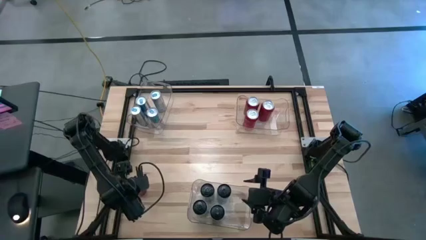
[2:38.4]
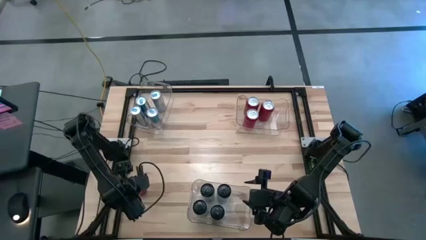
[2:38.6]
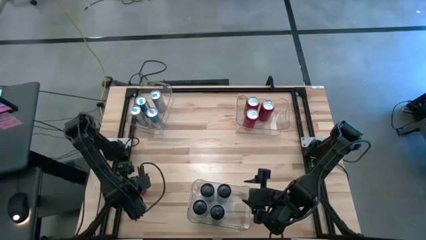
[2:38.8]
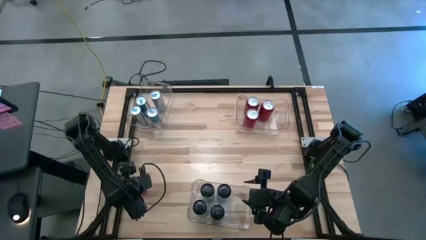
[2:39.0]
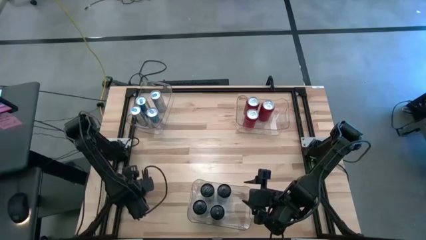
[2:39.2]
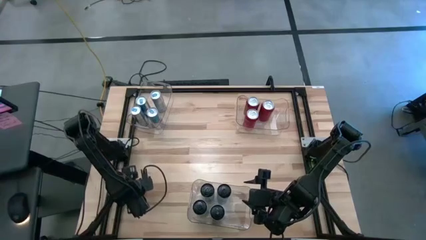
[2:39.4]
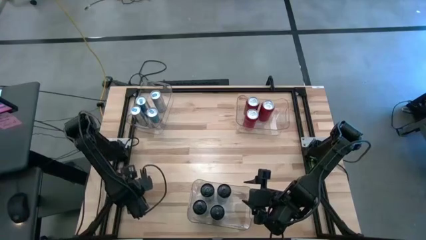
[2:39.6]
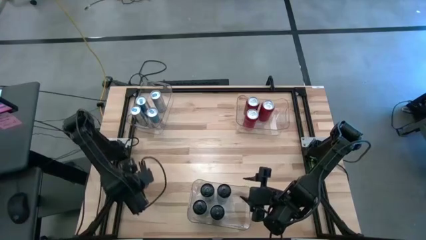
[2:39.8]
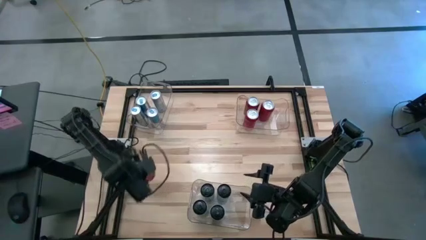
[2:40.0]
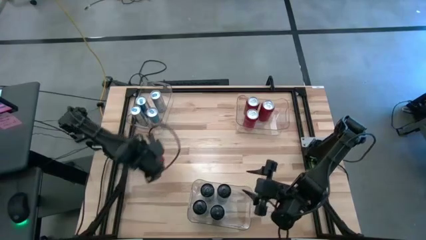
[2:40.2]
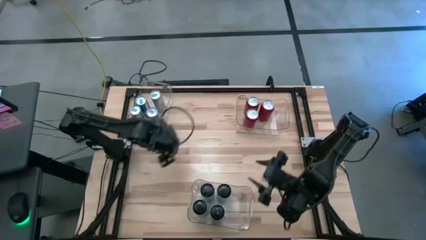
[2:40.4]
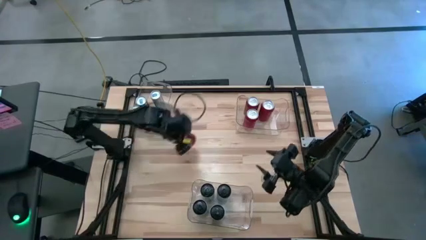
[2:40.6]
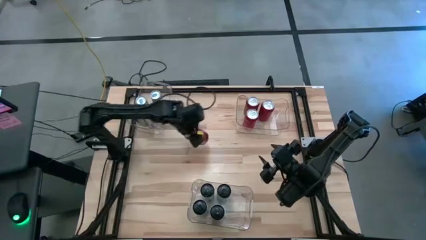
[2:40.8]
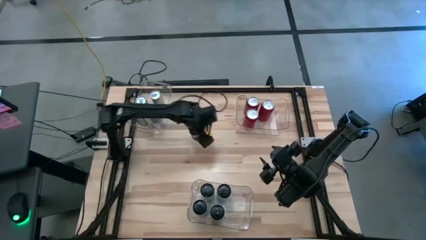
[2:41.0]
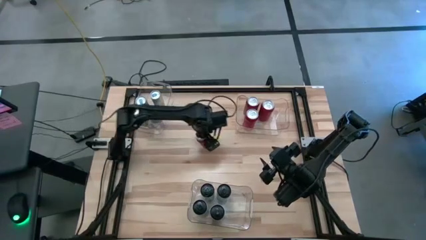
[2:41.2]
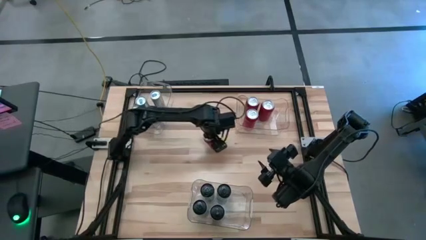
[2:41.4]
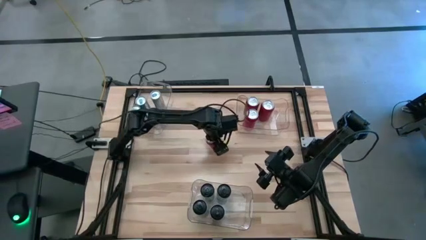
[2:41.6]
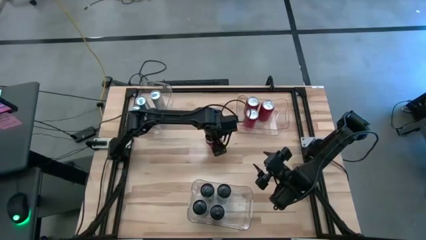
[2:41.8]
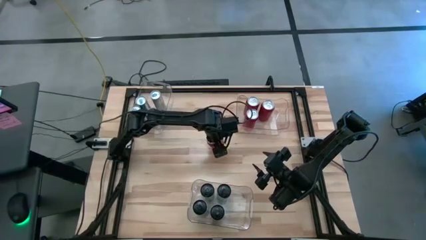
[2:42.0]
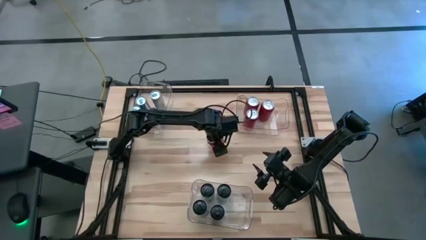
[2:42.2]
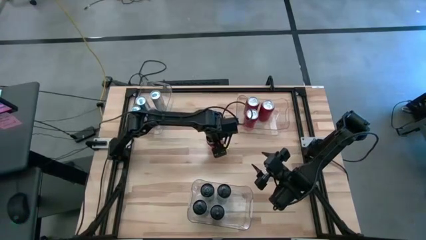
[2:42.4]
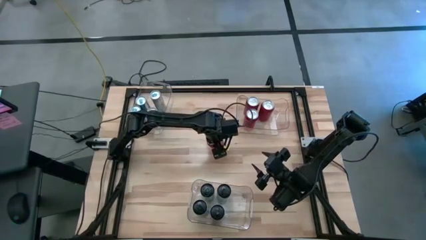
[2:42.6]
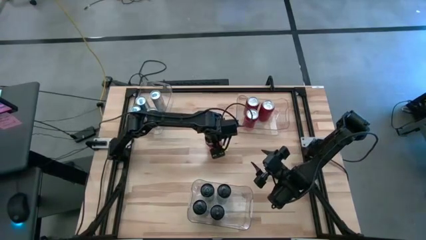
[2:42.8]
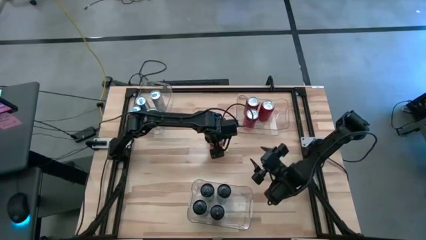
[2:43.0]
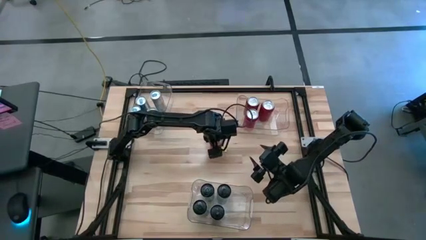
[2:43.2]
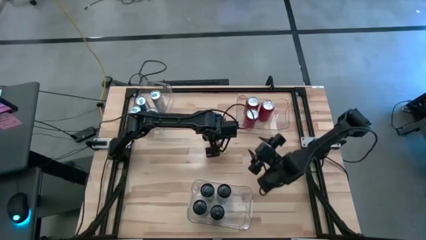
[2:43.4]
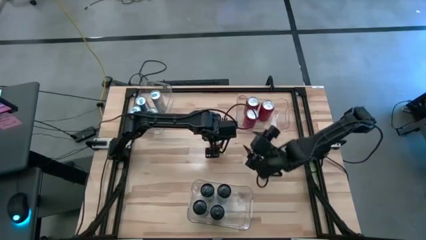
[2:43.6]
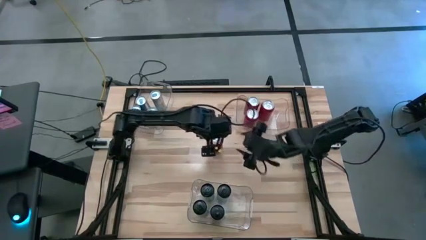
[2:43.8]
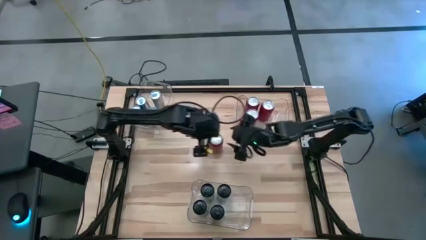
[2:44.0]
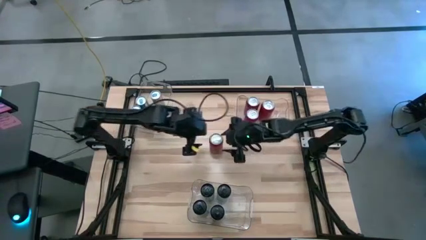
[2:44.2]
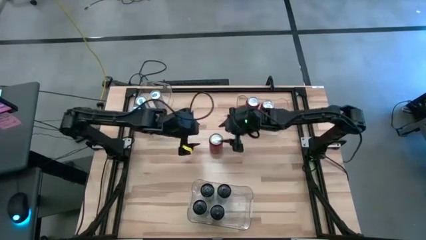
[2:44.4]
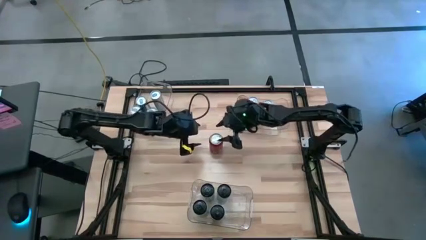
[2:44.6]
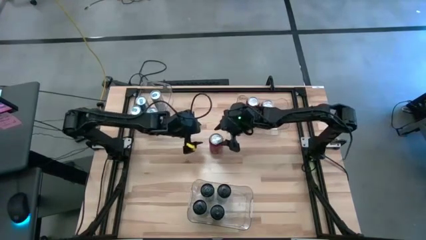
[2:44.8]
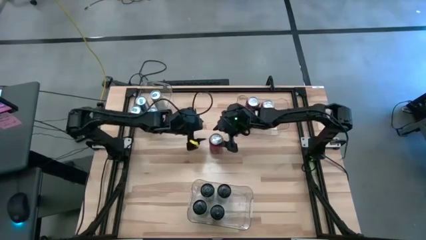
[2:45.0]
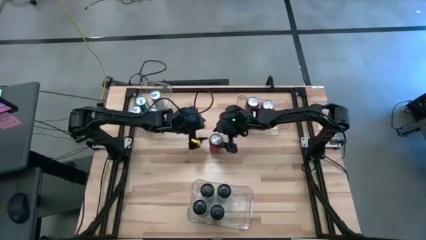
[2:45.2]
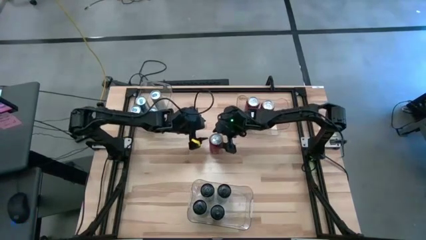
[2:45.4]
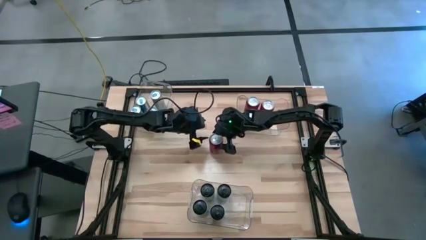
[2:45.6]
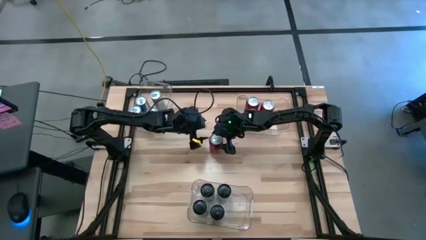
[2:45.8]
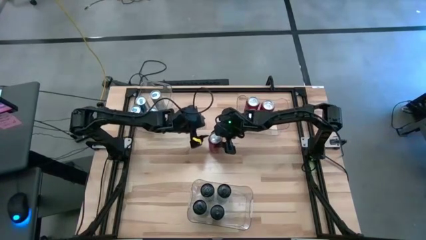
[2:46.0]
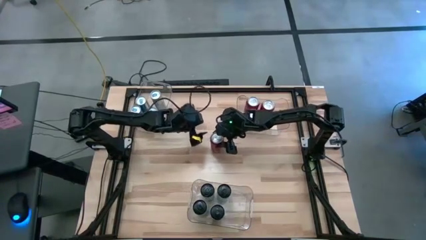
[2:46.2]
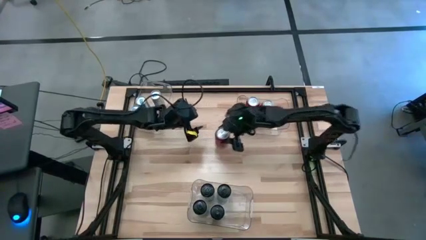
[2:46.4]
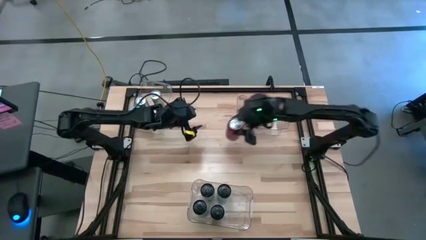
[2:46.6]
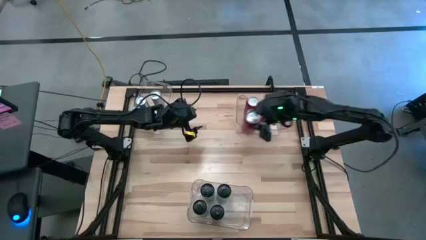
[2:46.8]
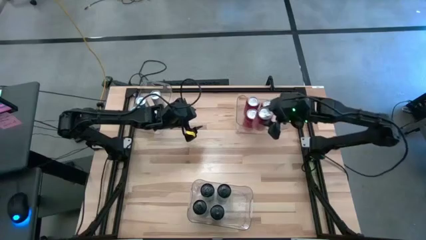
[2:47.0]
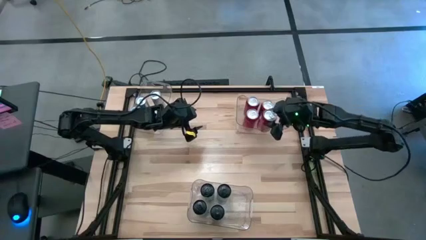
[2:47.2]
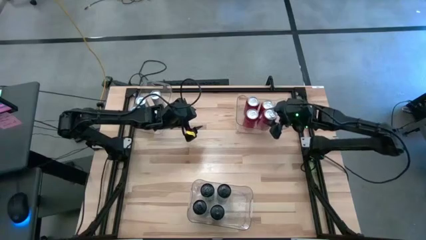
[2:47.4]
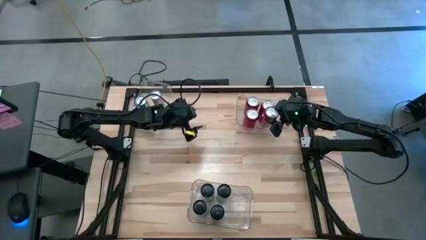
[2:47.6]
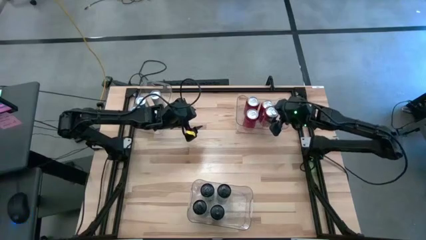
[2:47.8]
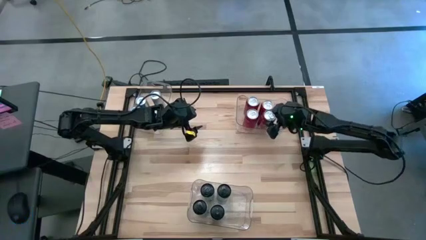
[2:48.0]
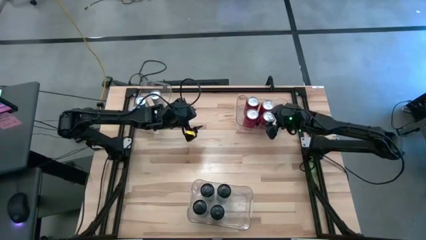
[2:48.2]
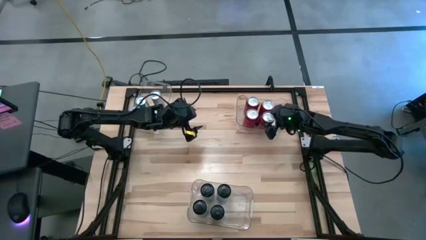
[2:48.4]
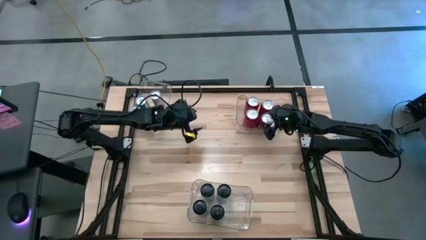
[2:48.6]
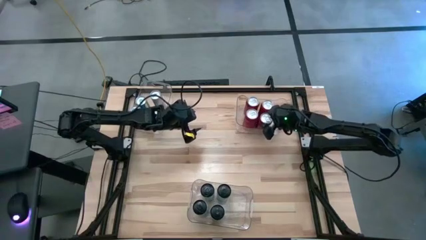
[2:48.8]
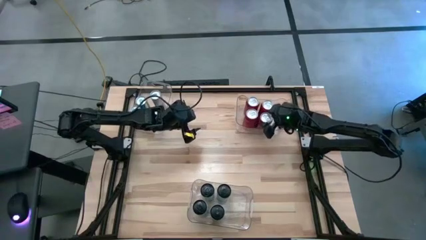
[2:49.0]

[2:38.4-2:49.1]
Task: Sort soda cans
Put the red soda can into the top right transparent bin

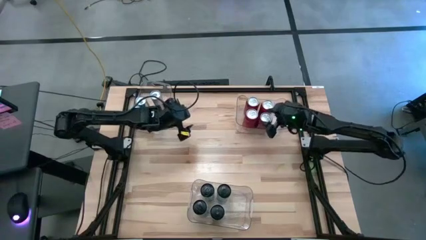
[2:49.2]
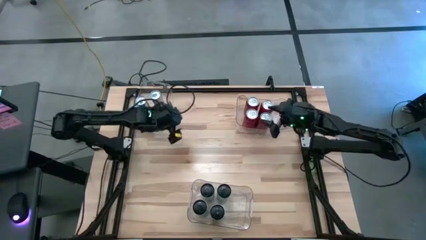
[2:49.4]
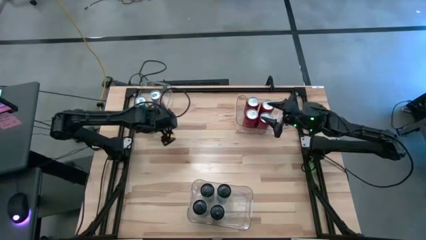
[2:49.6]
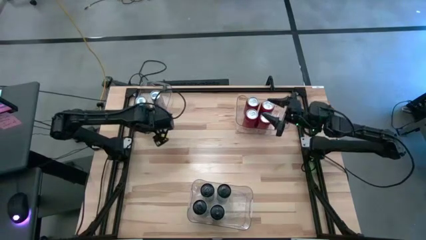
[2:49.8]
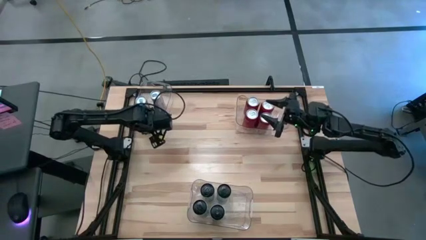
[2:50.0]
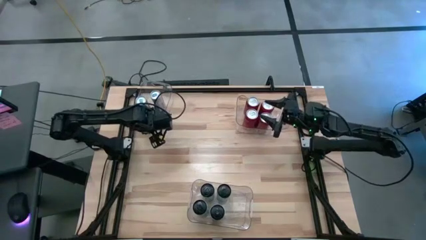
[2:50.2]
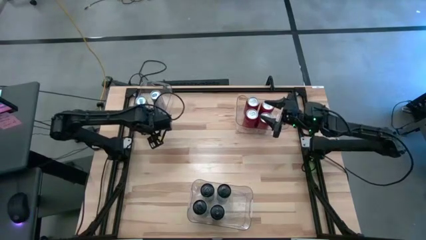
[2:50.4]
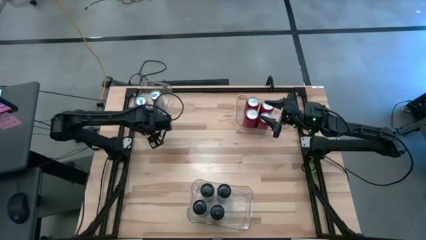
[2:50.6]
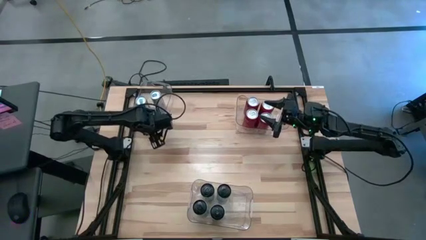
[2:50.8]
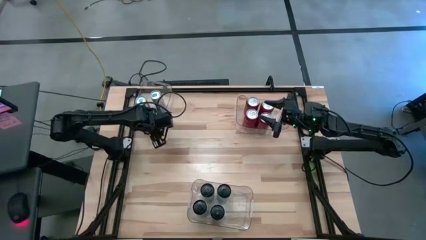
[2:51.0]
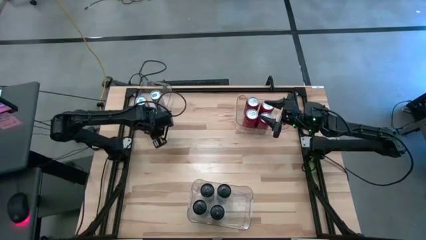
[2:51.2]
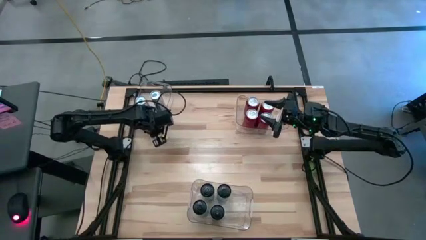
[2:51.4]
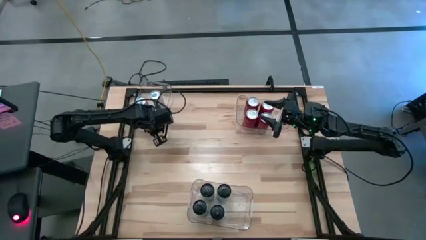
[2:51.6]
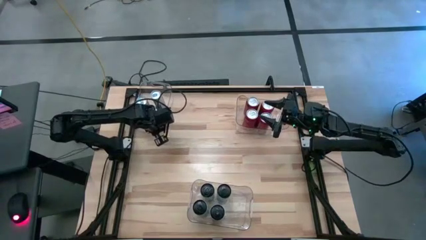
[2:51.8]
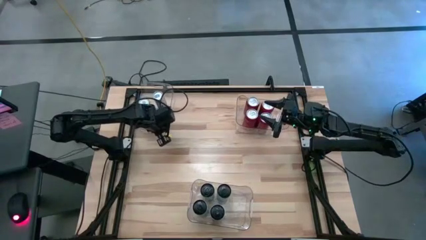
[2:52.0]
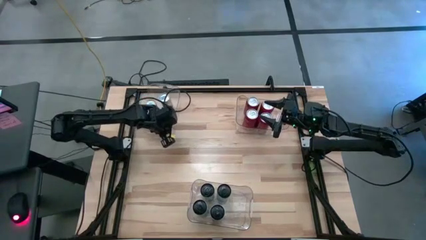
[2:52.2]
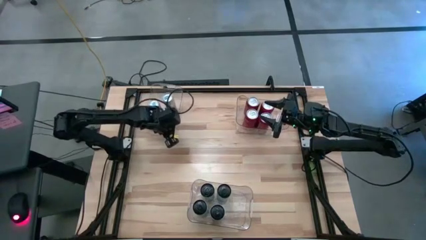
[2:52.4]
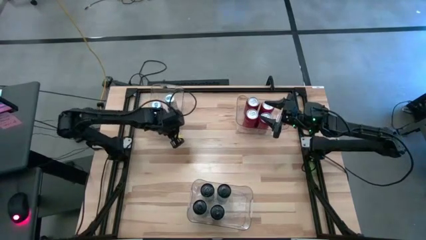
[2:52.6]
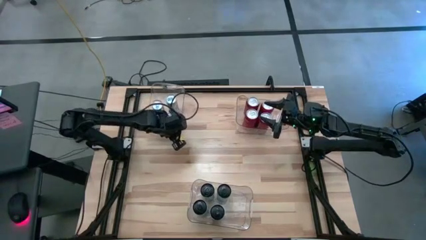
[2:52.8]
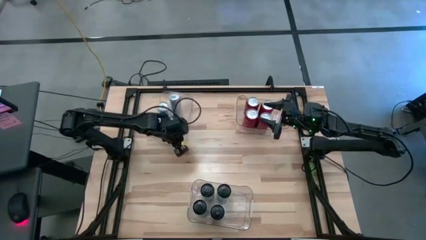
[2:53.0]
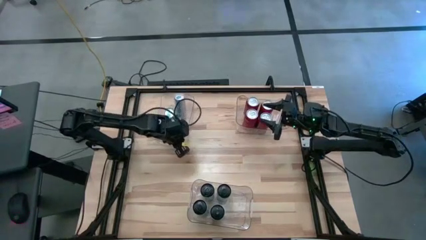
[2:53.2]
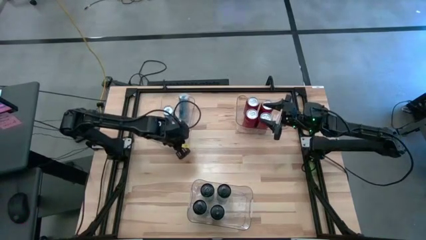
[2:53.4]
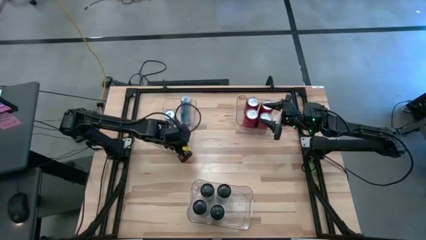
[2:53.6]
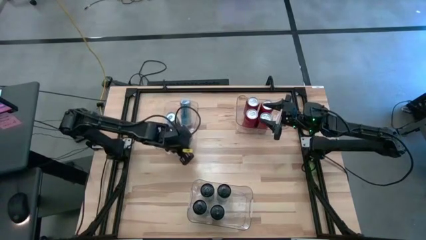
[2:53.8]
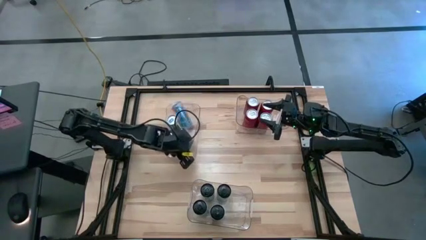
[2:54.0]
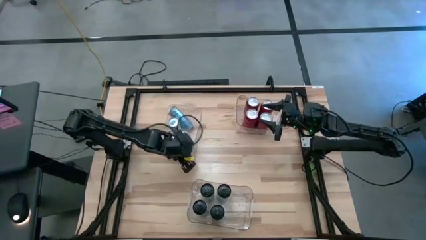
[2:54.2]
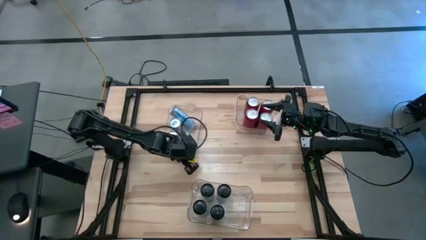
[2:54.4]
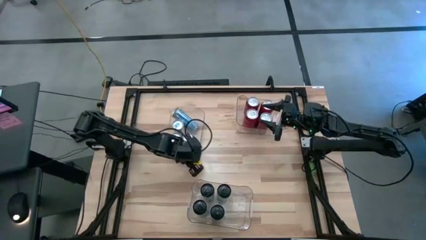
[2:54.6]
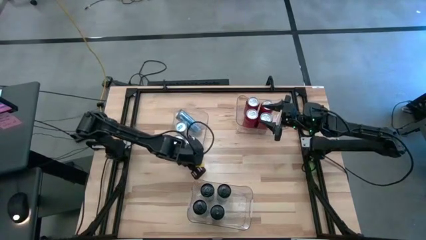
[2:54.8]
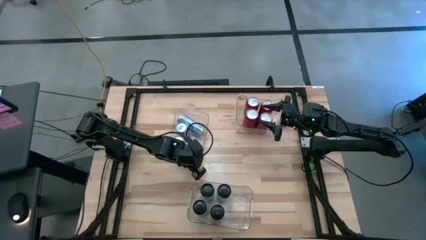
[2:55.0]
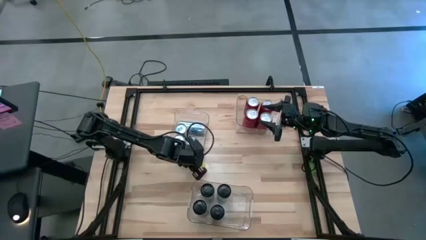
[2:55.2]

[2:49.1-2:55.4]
Move the top left transparent bin to the center of the table
